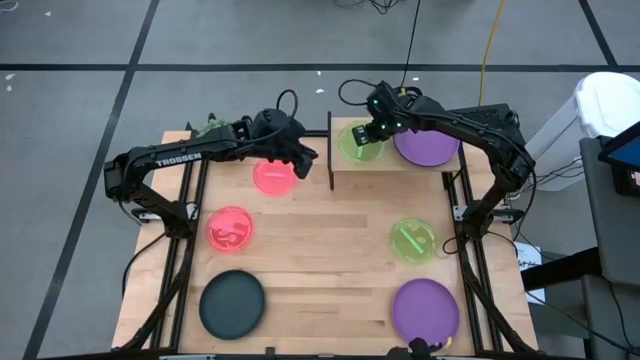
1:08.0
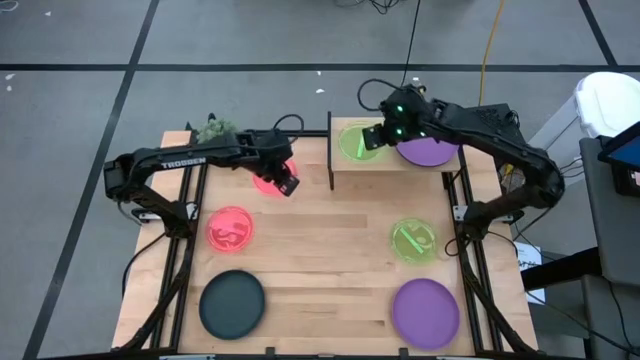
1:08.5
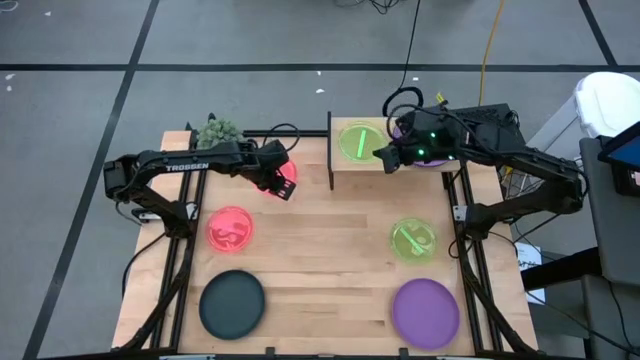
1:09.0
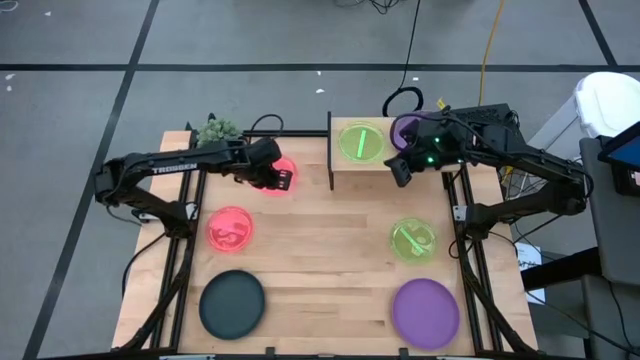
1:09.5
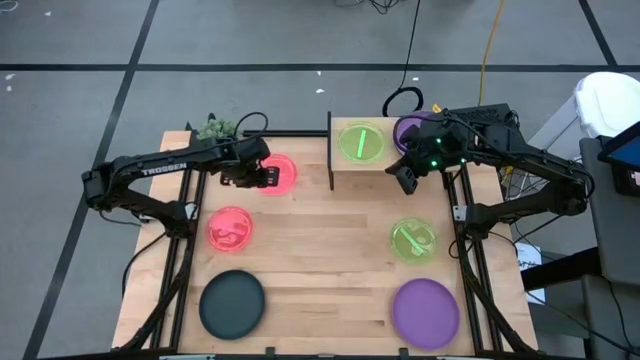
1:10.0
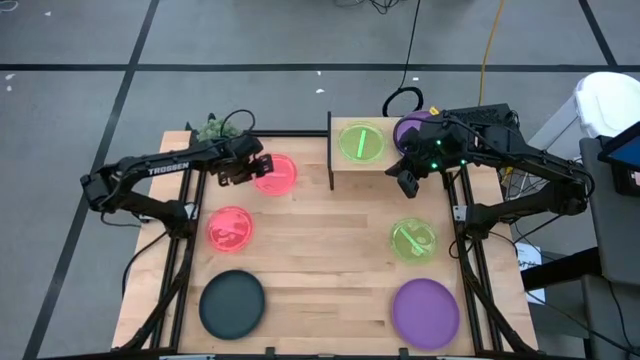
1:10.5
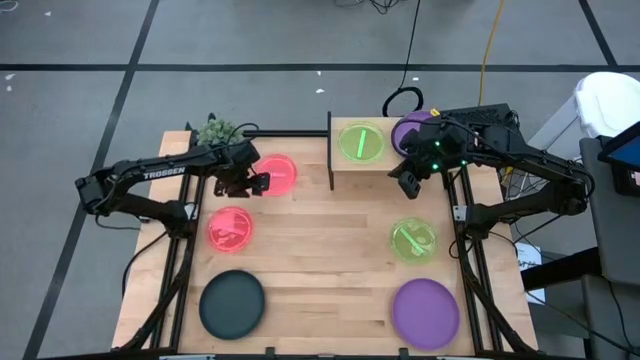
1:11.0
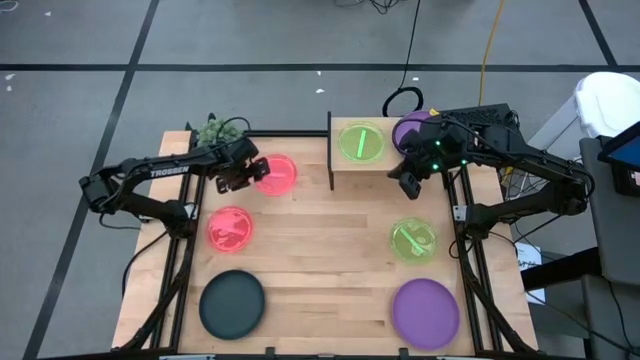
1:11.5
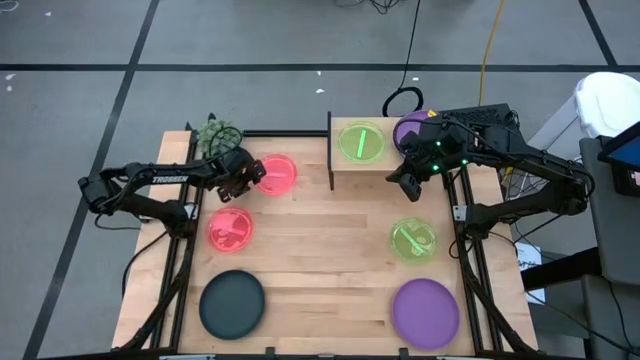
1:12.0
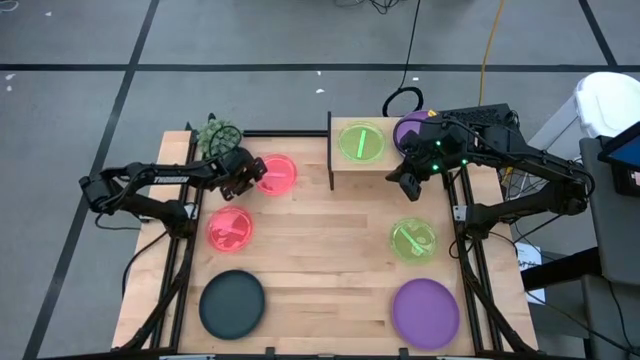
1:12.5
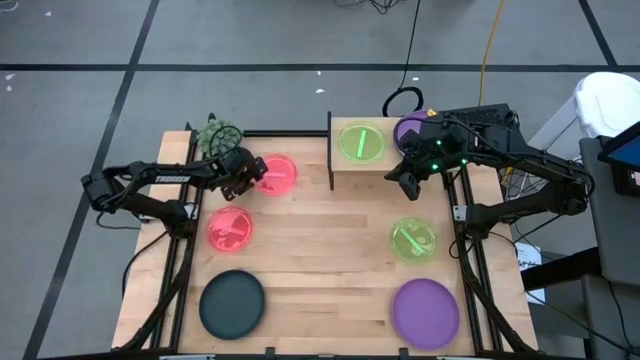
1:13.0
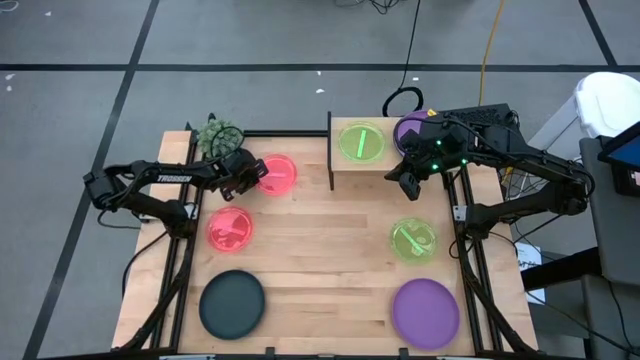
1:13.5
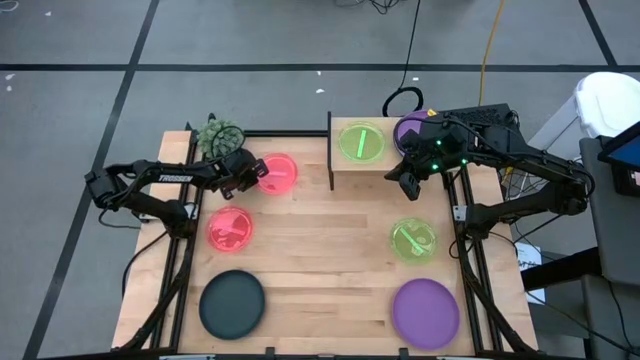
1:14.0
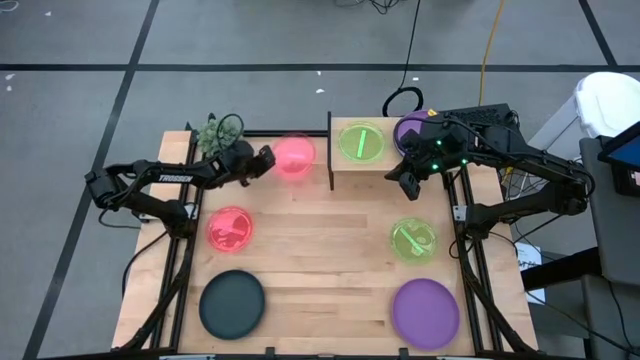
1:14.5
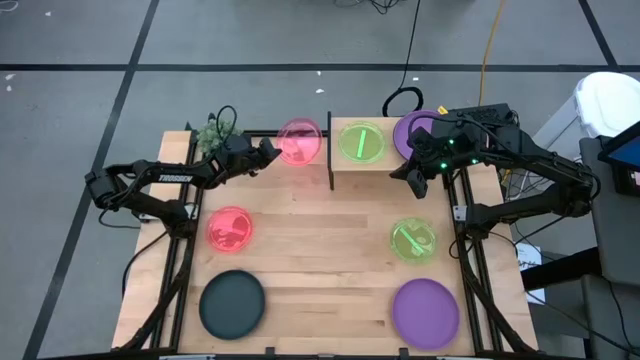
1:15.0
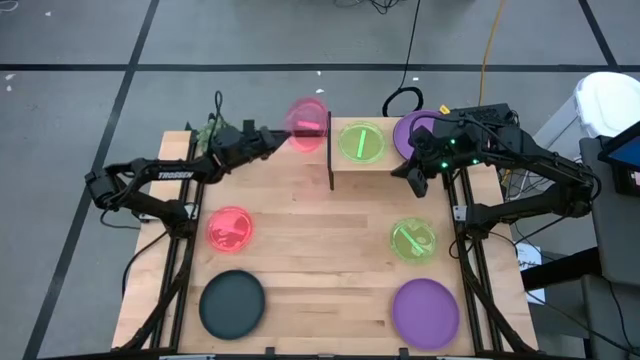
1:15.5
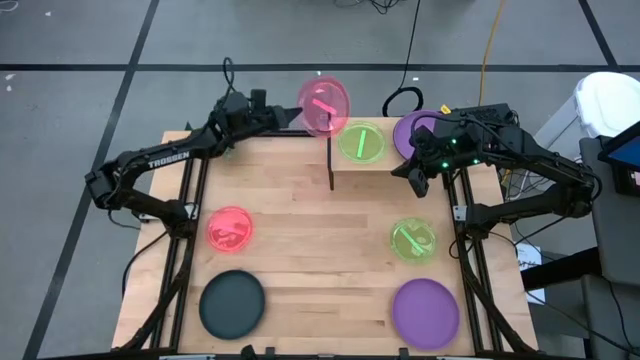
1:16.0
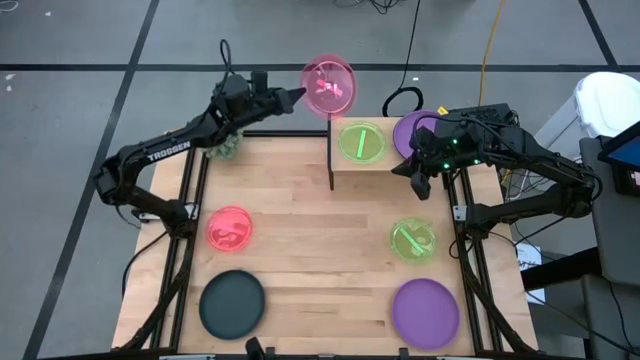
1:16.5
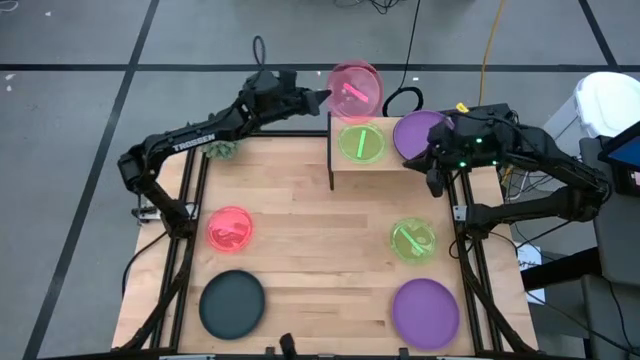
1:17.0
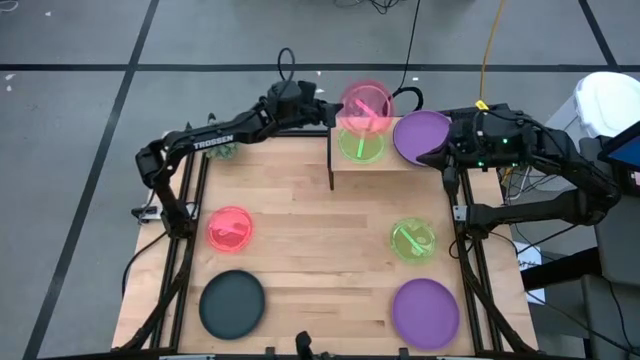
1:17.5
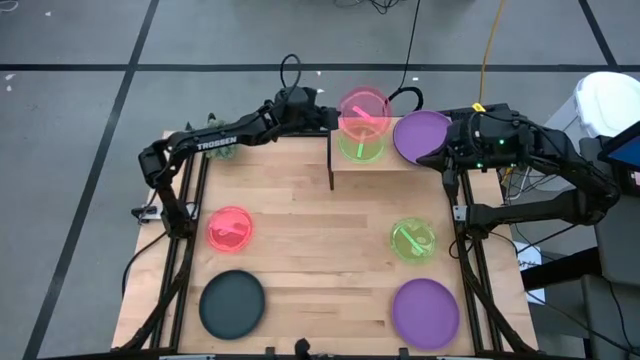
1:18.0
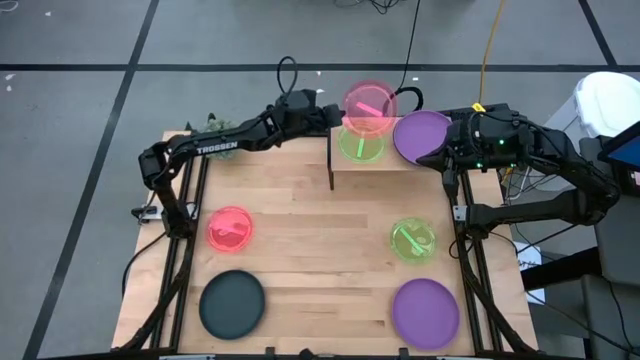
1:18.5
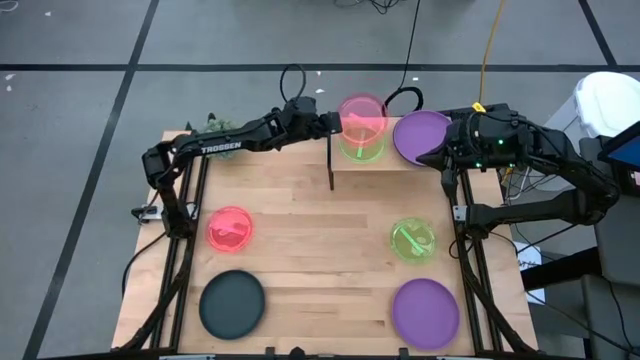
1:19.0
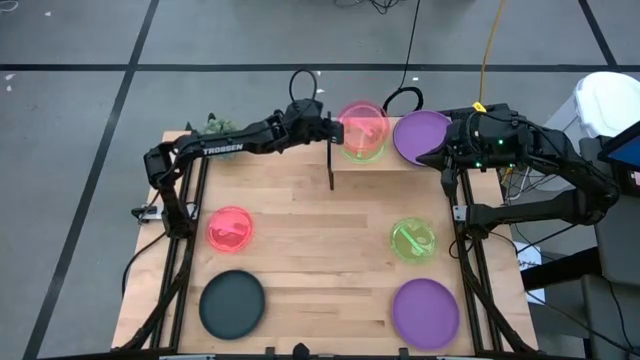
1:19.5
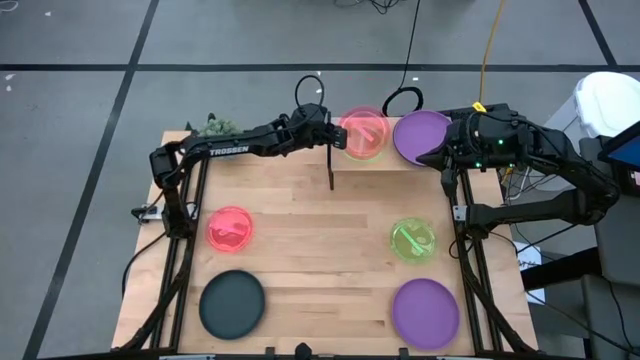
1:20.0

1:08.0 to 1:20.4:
Task: Place and stack plates onto a shelf
Stack the top pink plate on the green plate on the shelf

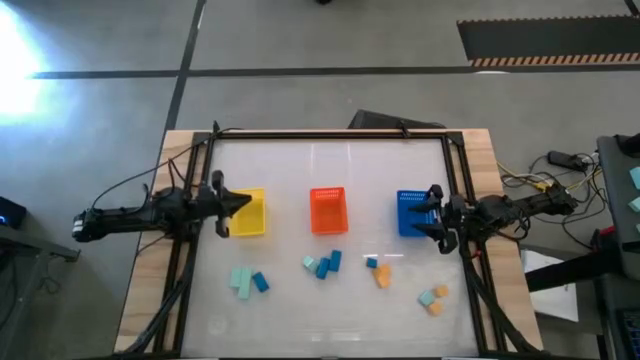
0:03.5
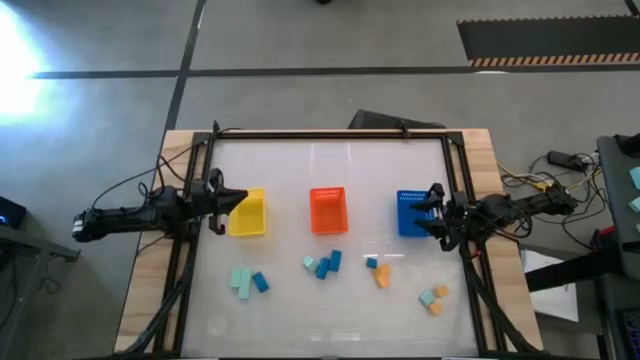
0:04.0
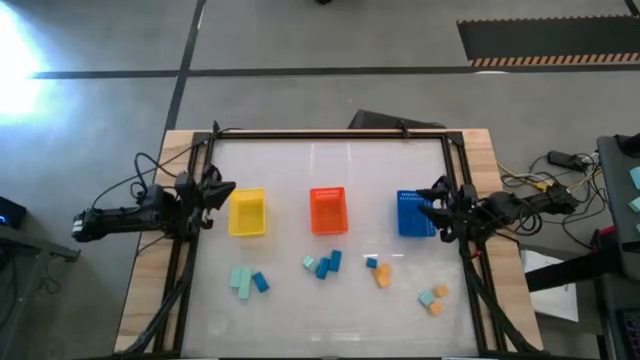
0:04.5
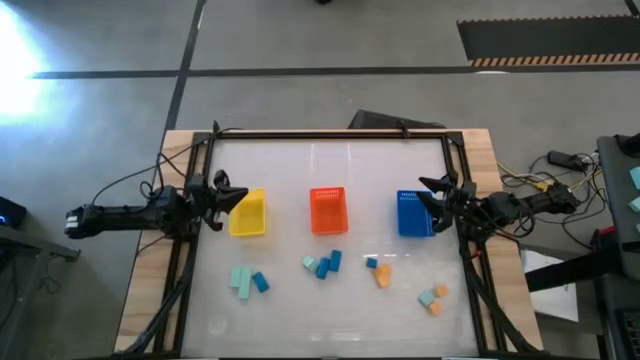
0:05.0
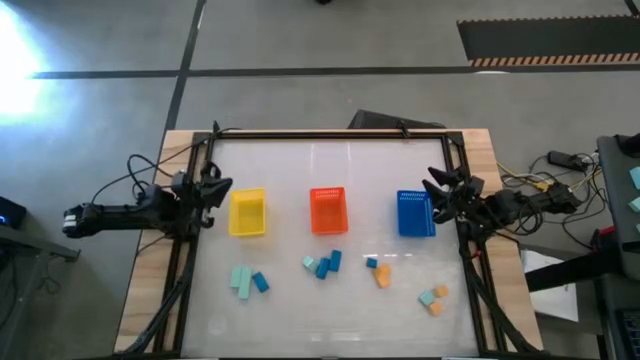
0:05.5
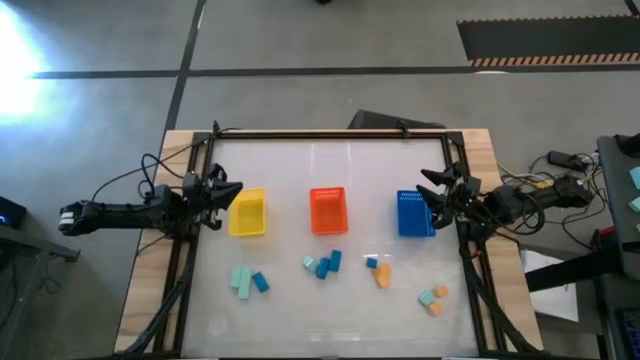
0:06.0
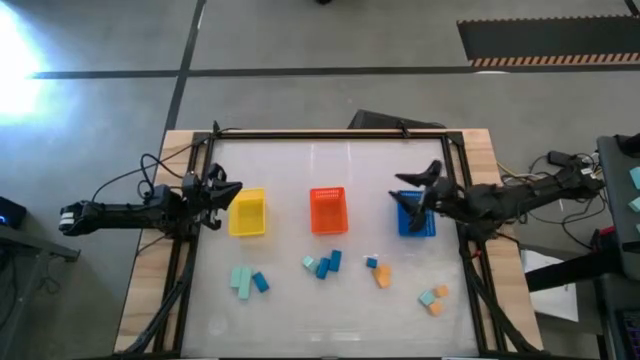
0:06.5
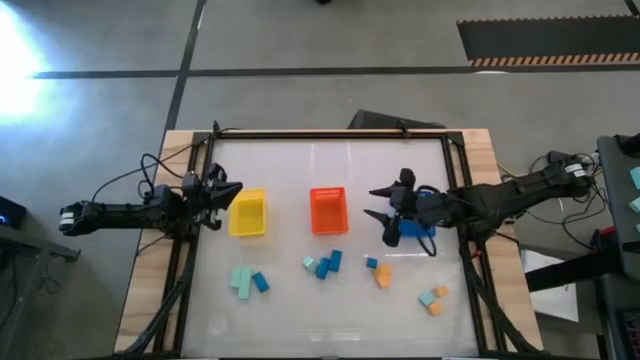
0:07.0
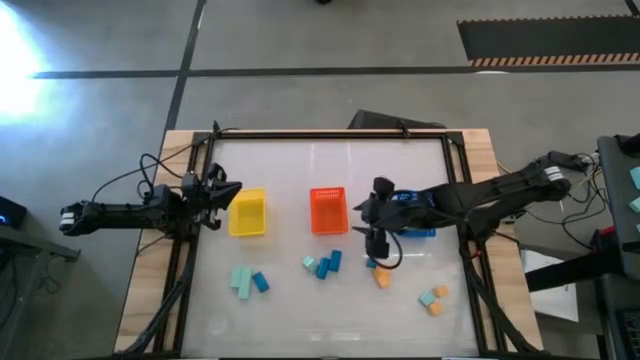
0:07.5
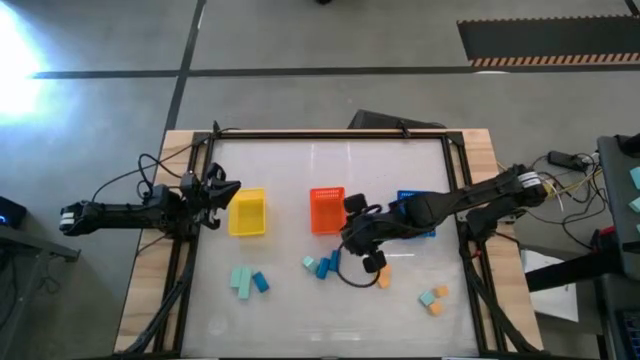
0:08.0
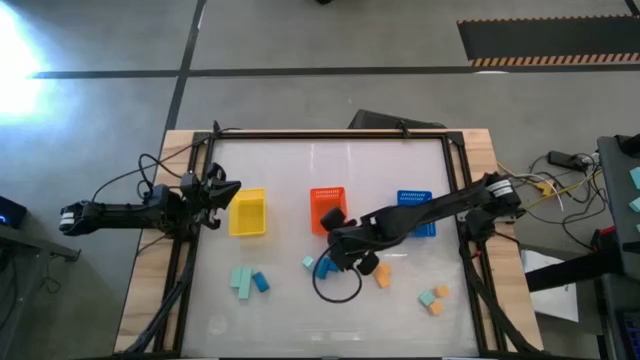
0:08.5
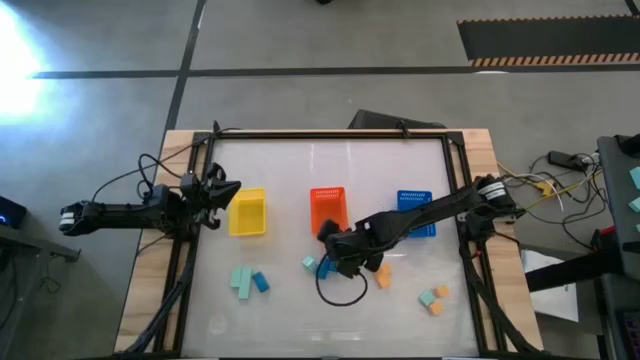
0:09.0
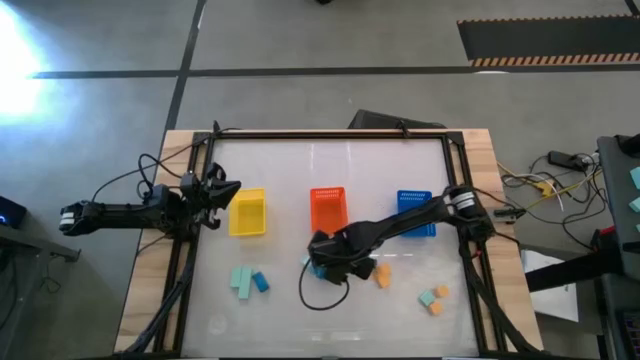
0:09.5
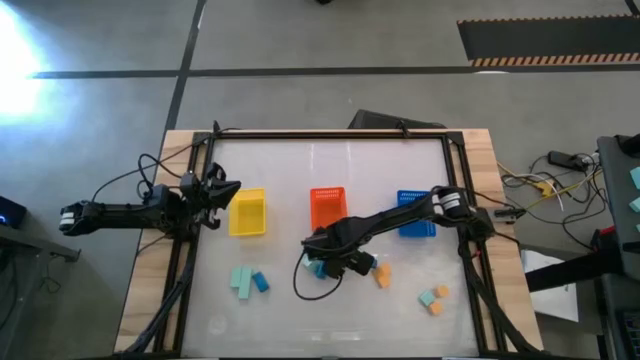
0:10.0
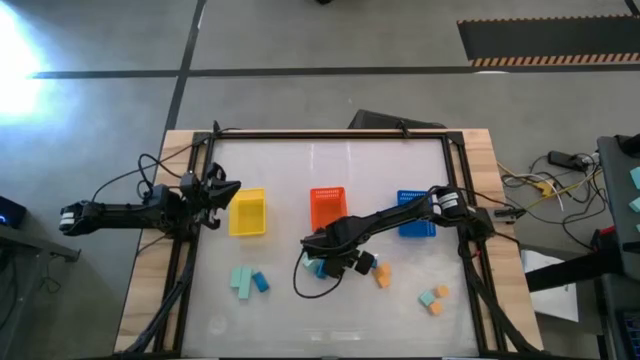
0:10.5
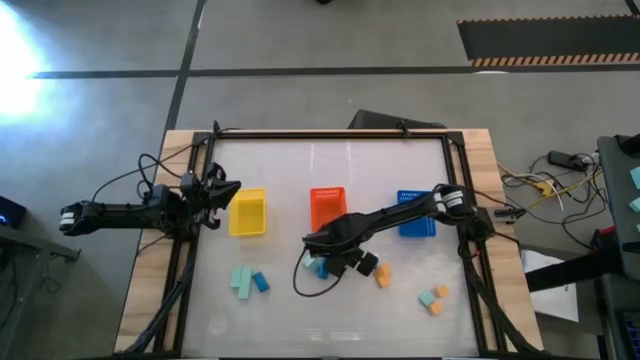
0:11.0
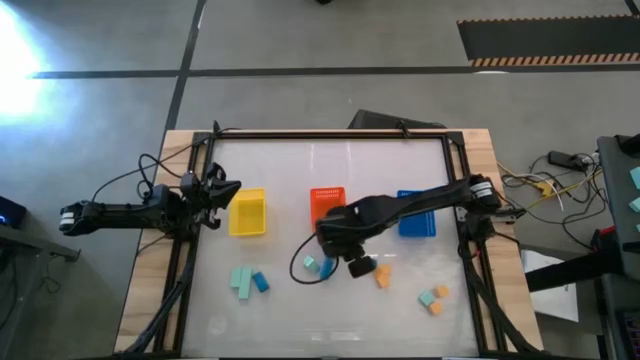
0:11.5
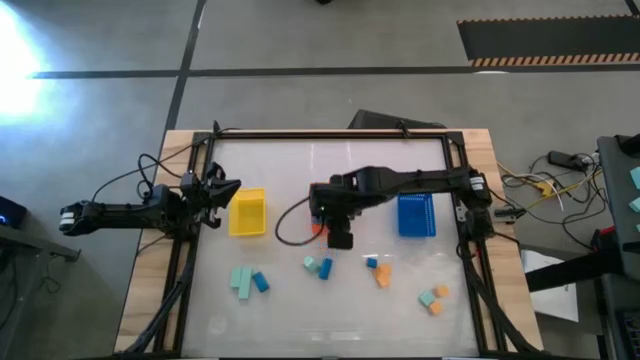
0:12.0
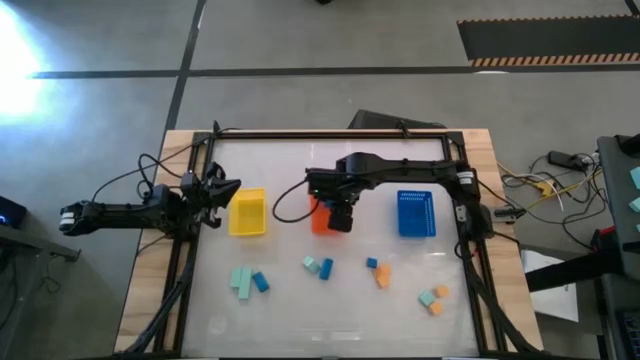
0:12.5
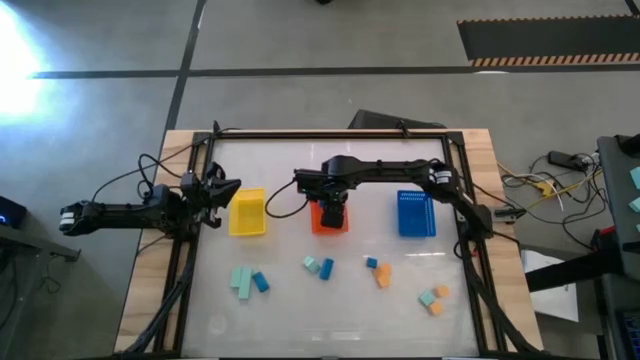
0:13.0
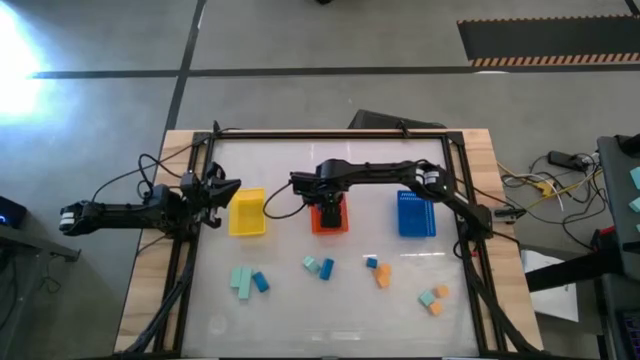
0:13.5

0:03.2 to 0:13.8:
Task: Sort & place blocks by color
Put the blue block into the orange bin
